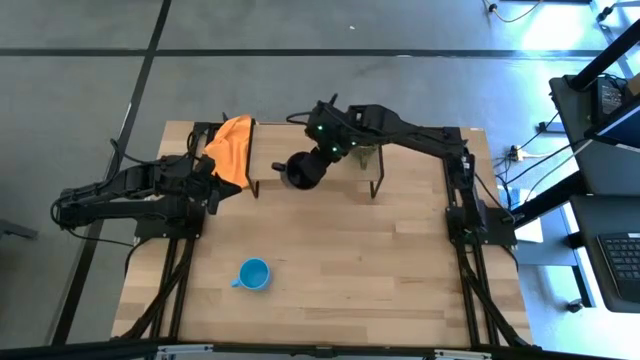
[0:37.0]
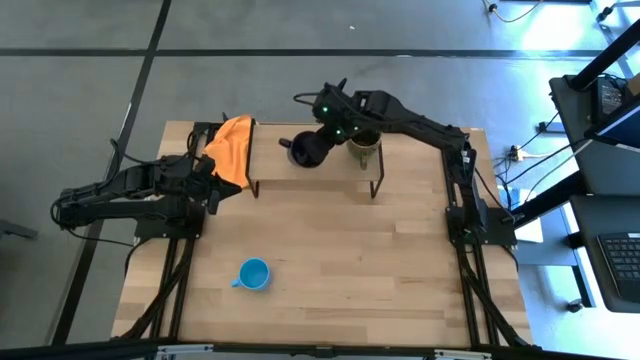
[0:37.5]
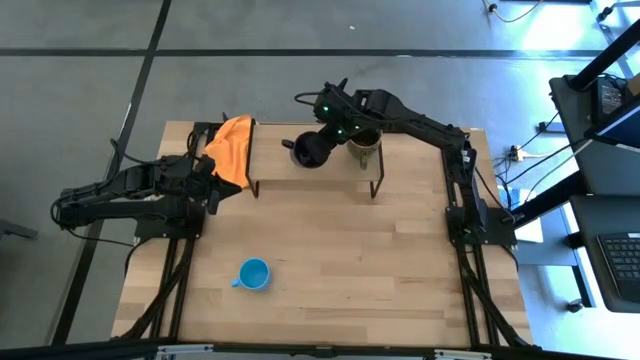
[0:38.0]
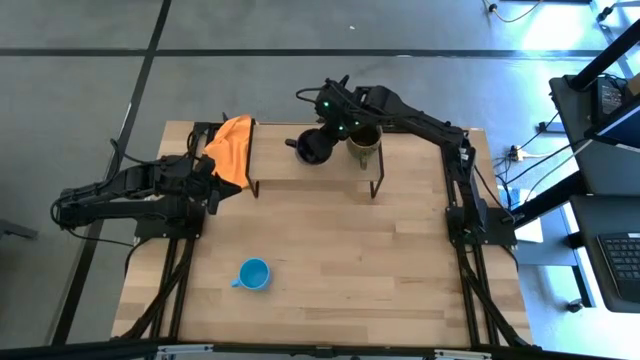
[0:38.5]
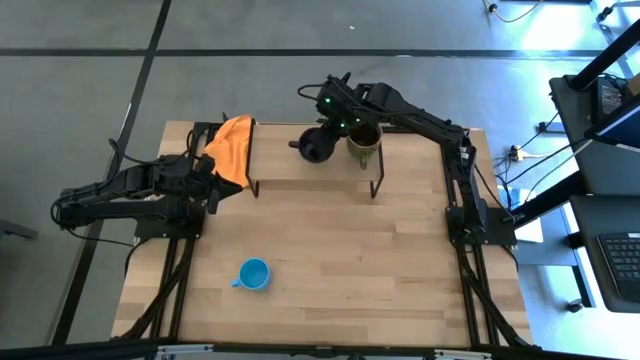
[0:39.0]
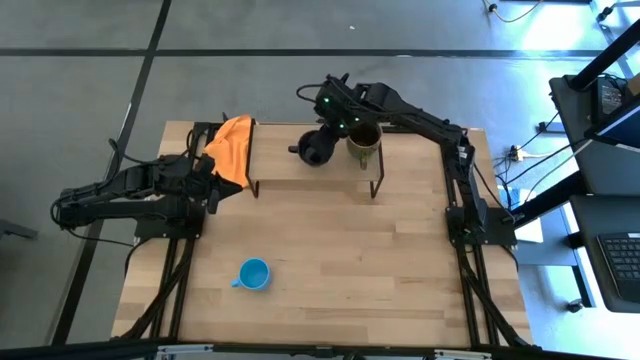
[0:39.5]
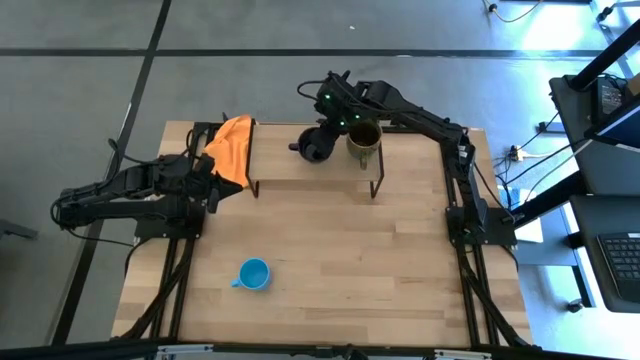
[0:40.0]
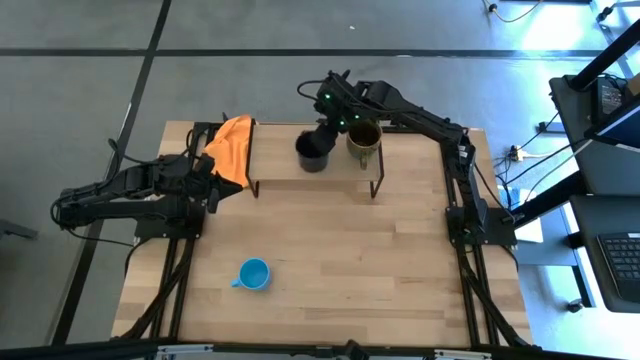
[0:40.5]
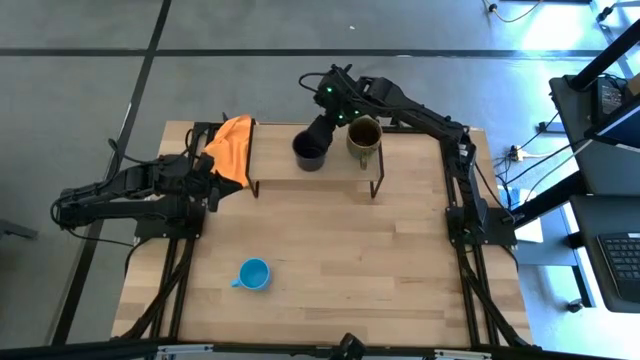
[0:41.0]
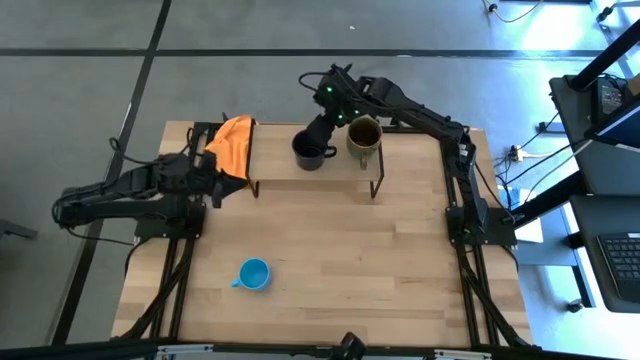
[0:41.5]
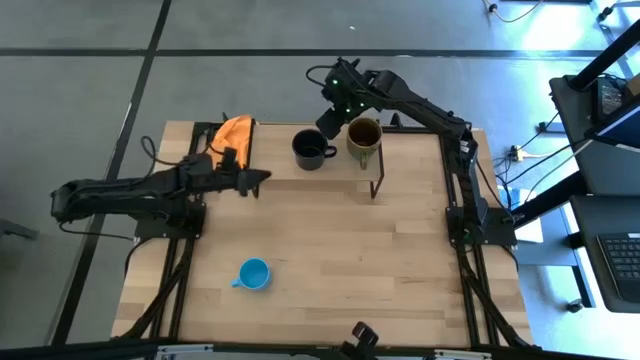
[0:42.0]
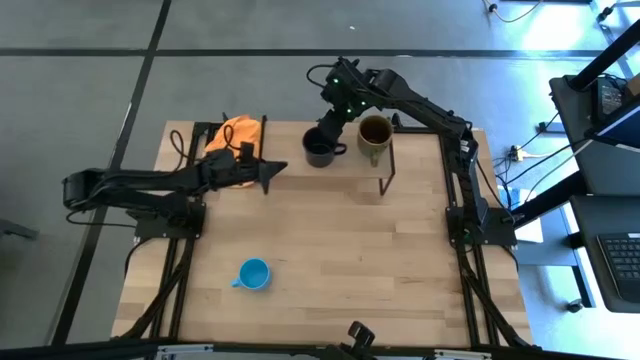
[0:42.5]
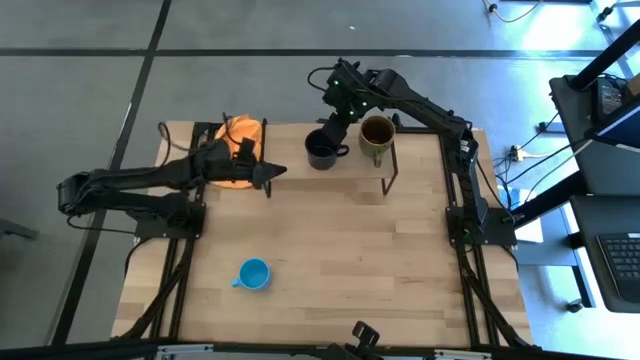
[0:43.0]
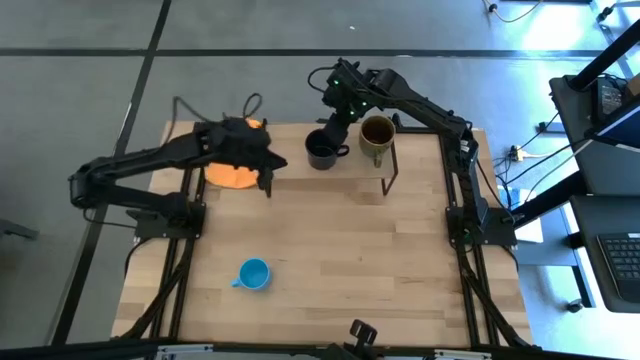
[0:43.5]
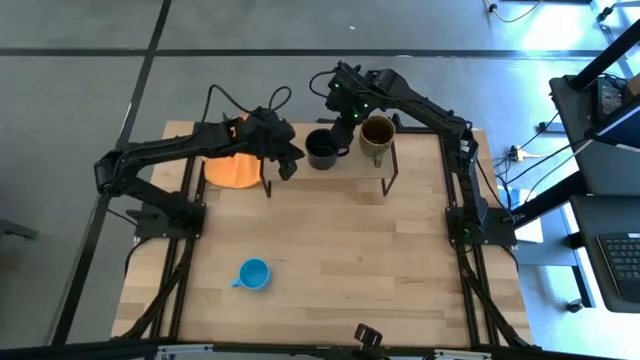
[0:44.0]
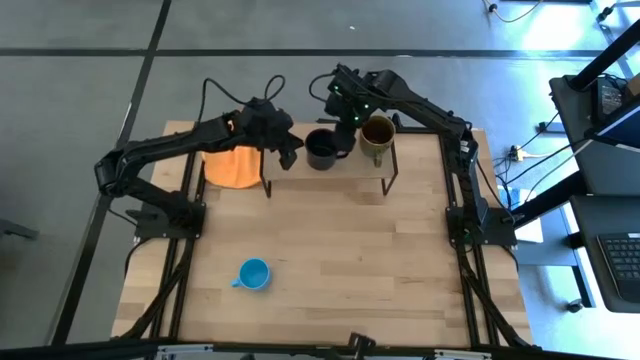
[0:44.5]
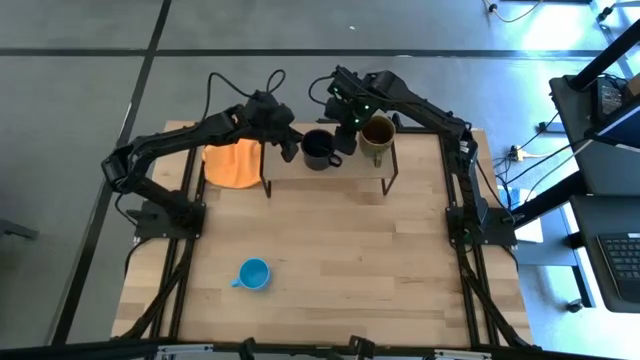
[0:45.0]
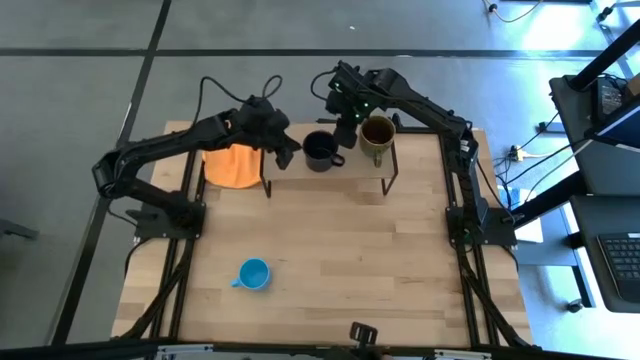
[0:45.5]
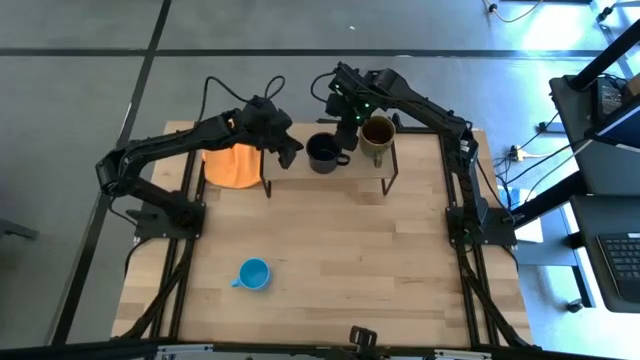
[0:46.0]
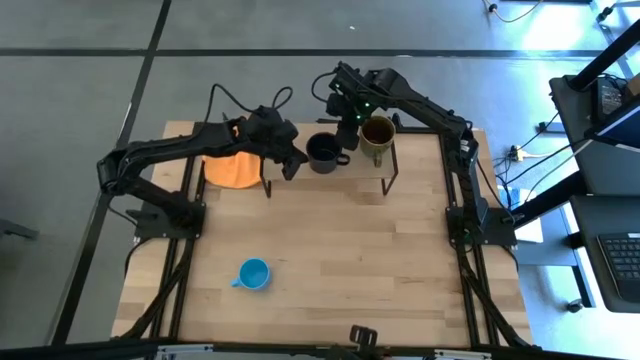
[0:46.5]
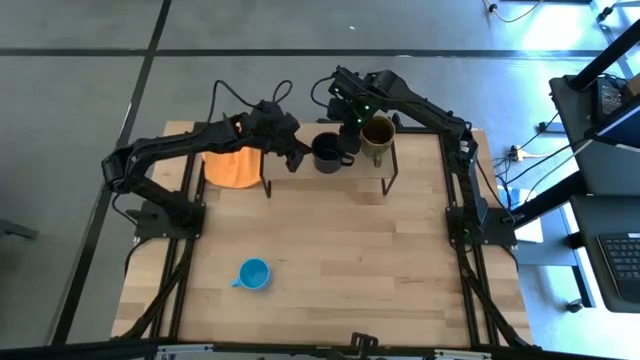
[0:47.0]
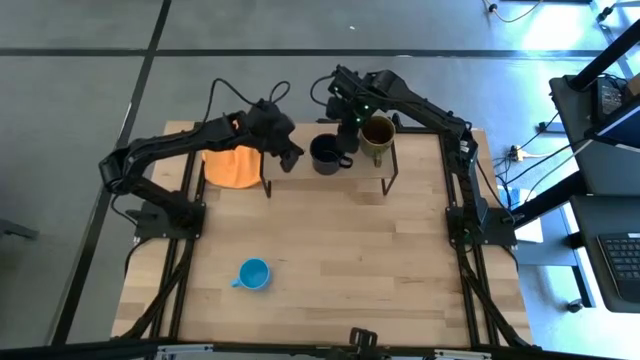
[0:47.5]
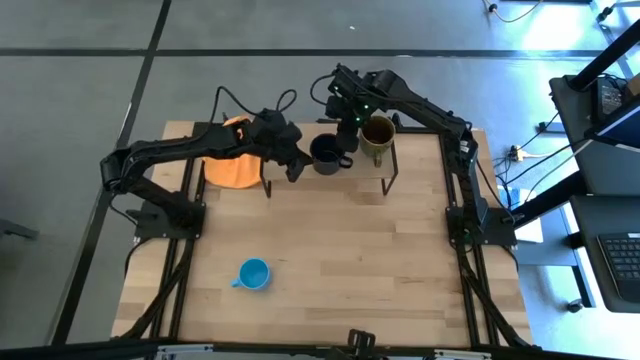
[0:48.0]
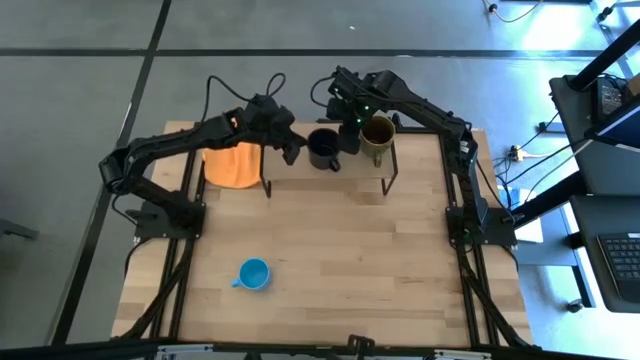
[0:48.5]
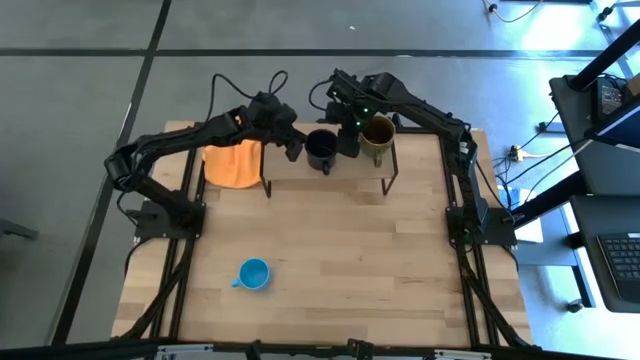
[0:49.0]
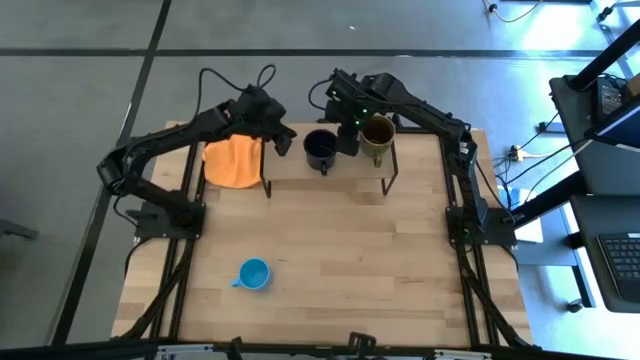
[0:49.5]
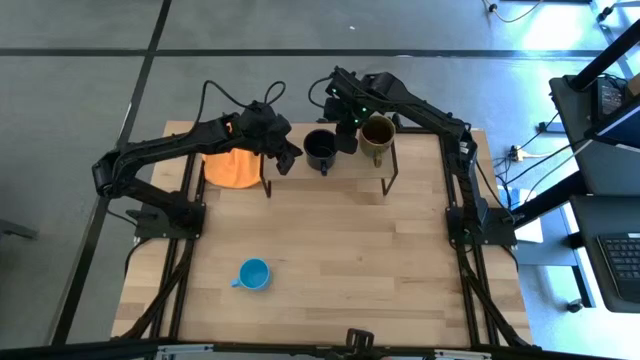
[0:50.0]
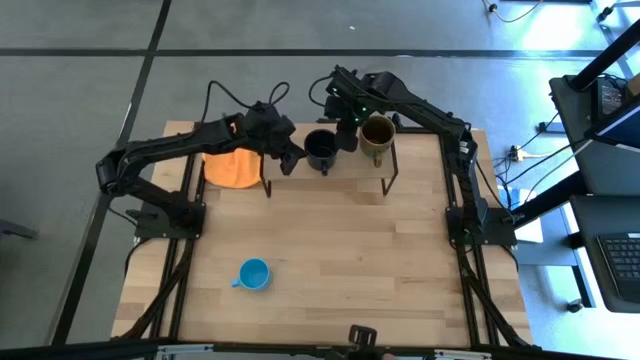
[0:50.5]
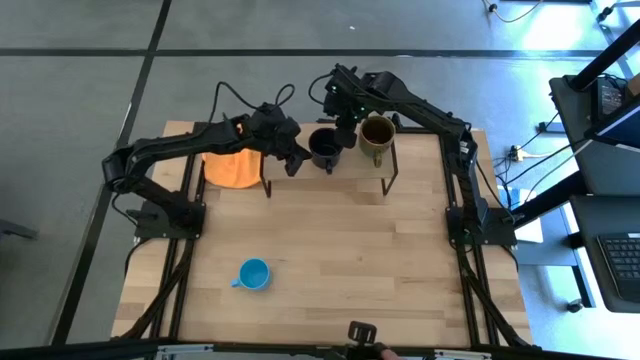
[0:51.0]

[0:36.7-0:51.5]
Task: Stack small to large cups/mugs on shelf
Put the dark blue mug on the shelf

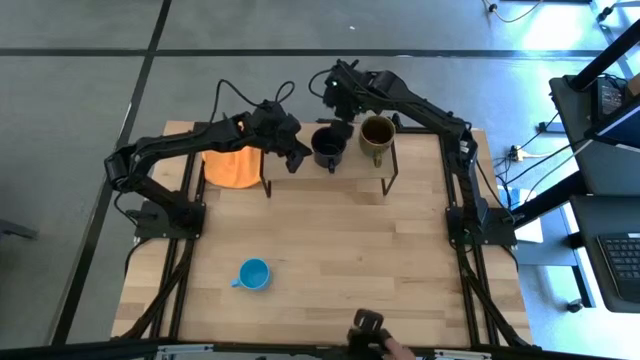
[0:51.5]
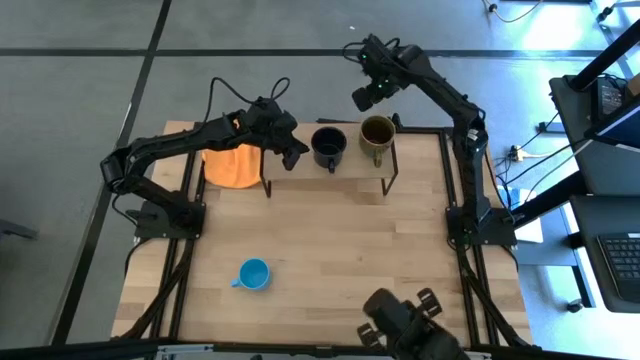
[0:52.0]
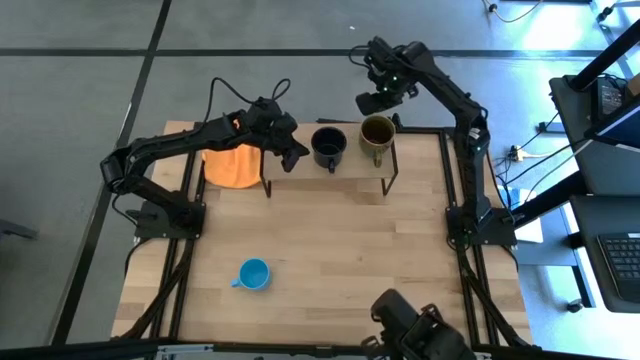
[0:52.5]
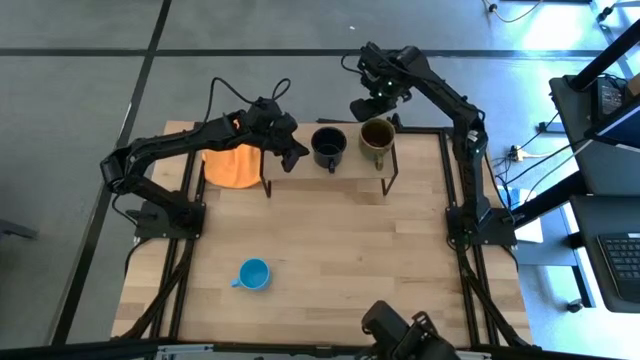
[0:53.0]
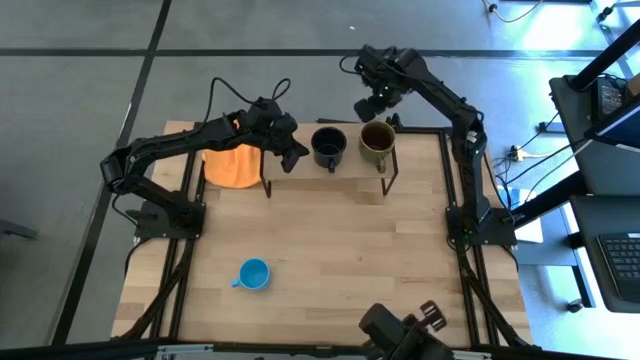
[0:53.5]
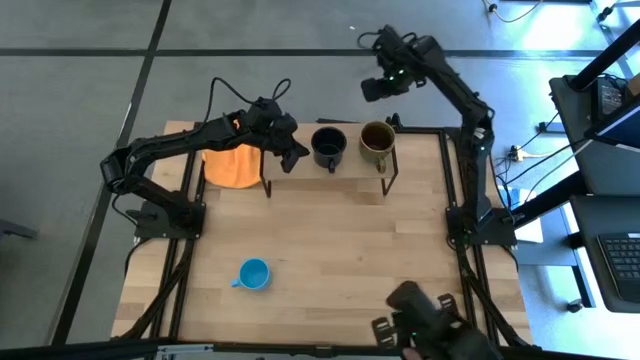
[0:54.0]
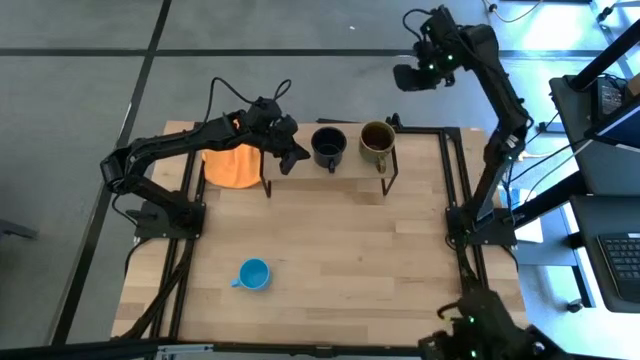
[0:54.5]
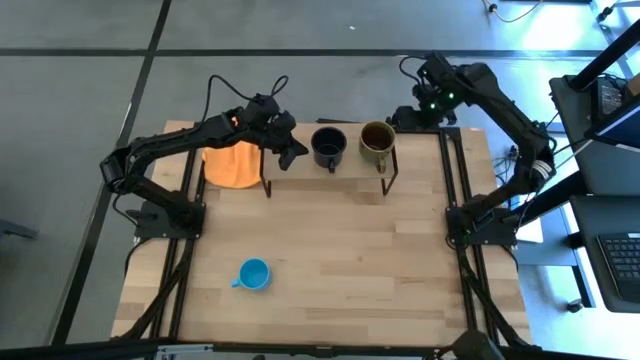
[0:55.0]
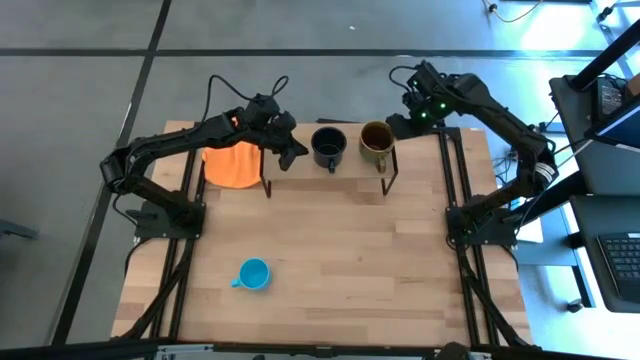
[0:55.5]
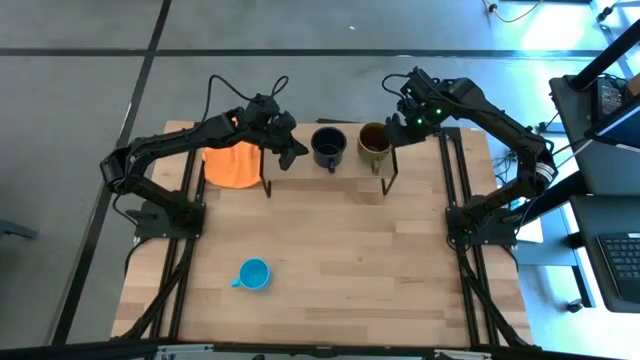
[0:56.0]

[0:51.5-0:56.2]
Adjust the brown mug on the shelf

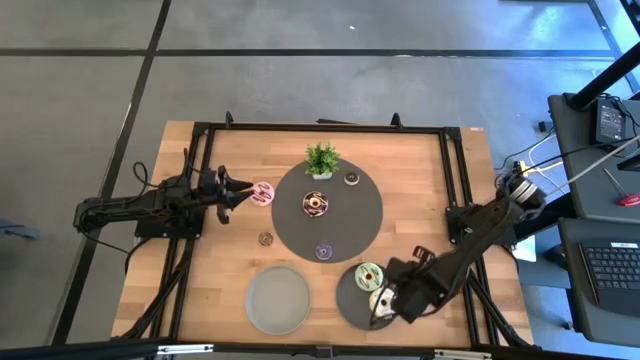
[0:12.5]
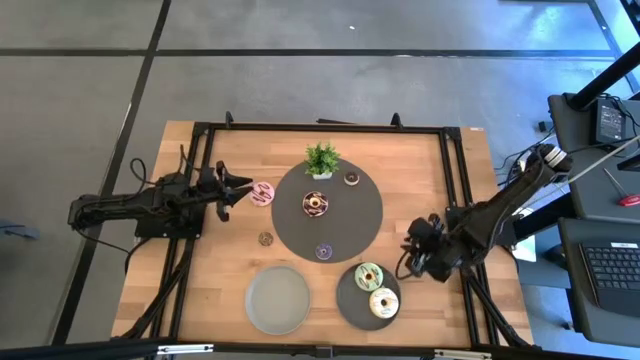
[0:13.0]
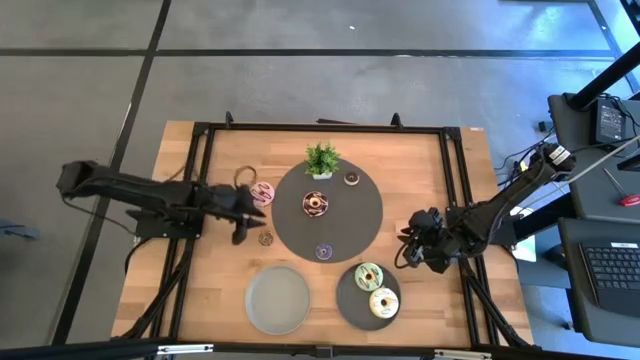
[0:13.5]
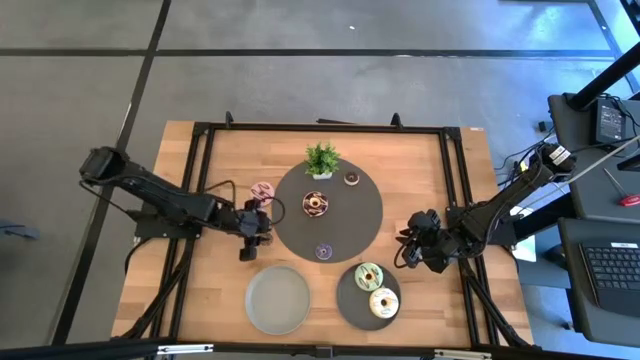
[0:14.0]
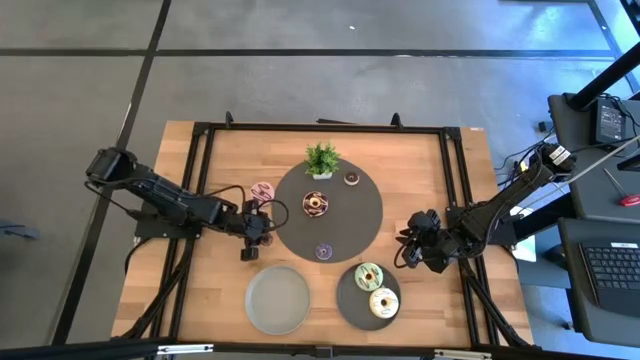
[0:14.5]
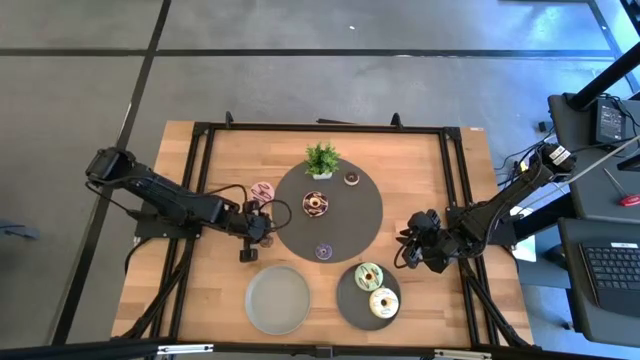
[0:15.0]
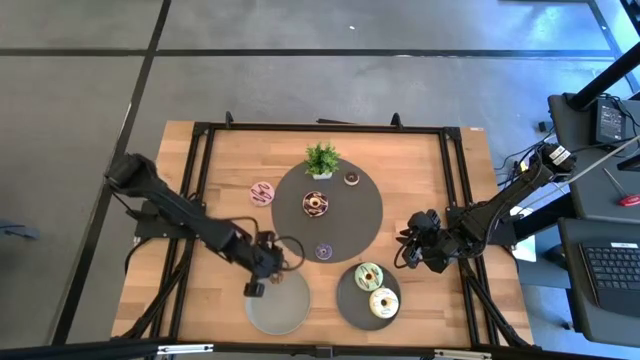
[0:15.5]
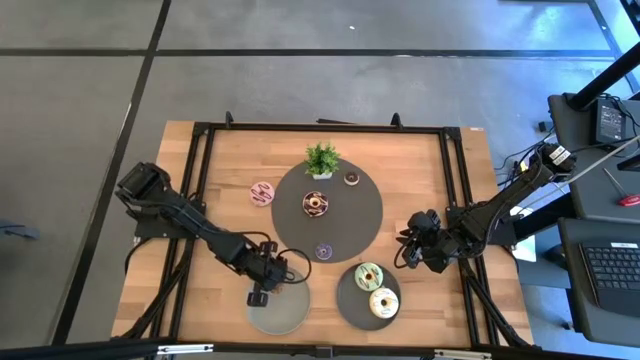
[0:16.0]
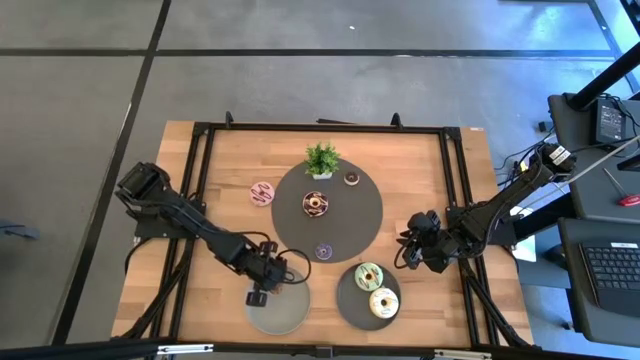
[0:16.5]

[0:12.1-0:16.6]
Task: Pick & Place donuts
Put the small brown donut on the gray plate
